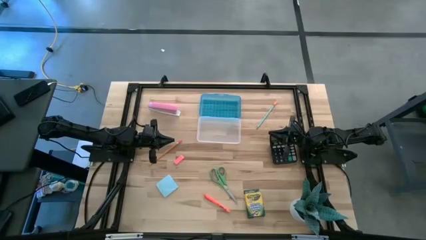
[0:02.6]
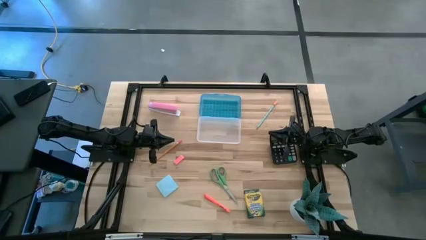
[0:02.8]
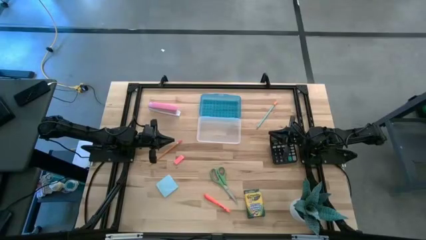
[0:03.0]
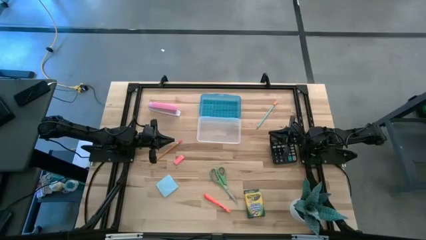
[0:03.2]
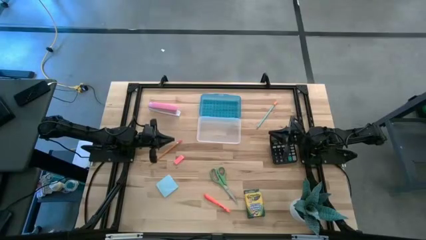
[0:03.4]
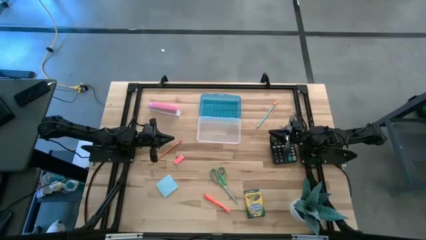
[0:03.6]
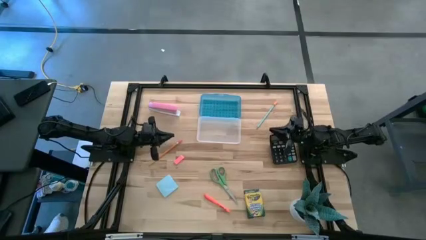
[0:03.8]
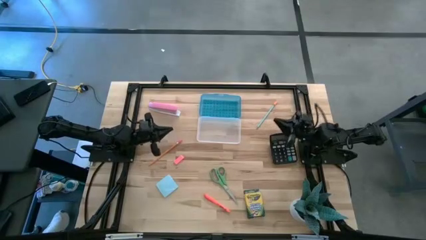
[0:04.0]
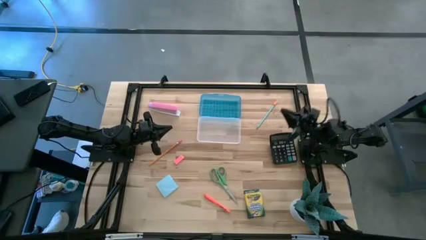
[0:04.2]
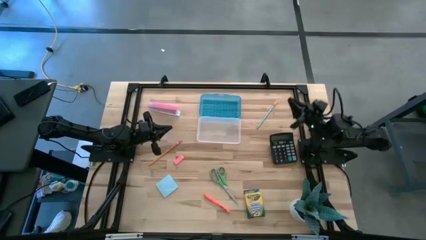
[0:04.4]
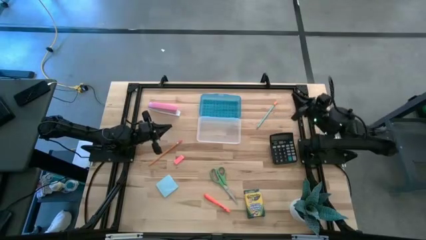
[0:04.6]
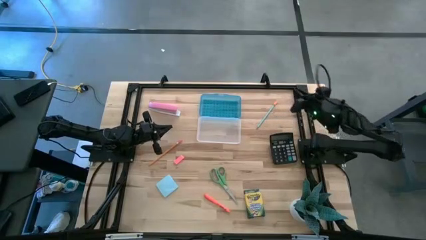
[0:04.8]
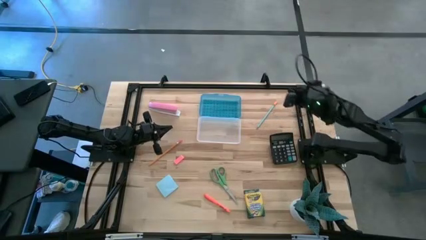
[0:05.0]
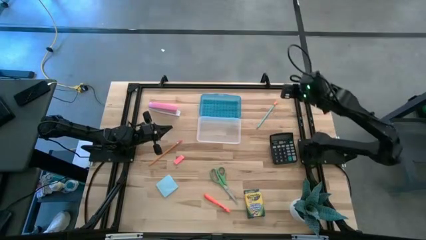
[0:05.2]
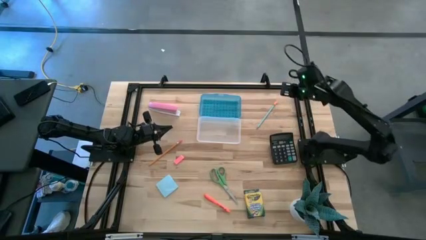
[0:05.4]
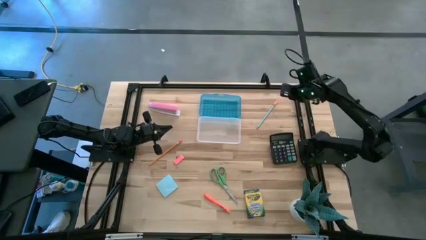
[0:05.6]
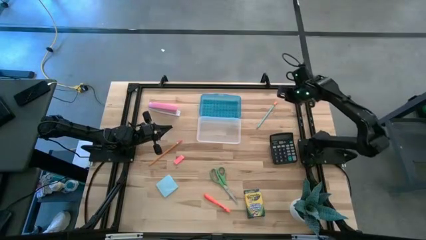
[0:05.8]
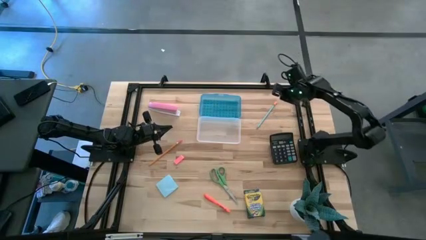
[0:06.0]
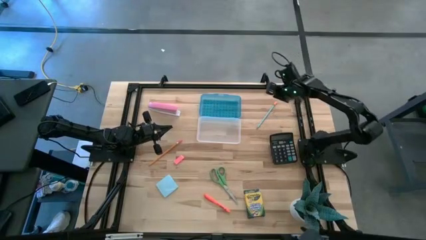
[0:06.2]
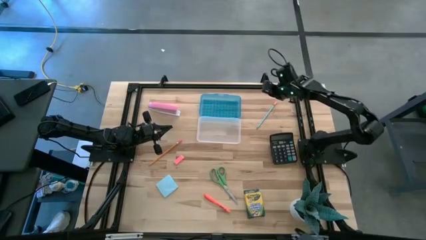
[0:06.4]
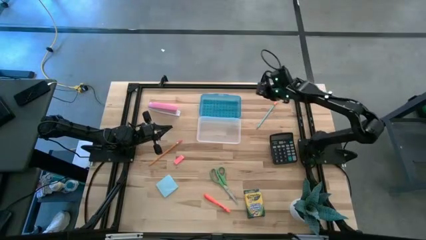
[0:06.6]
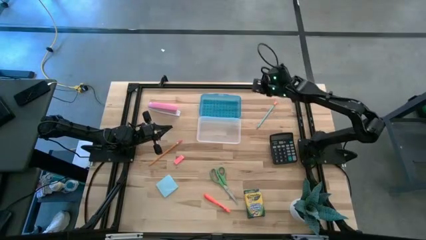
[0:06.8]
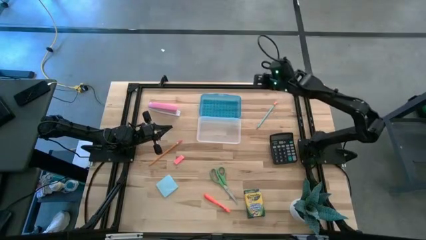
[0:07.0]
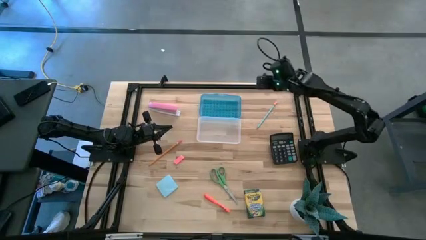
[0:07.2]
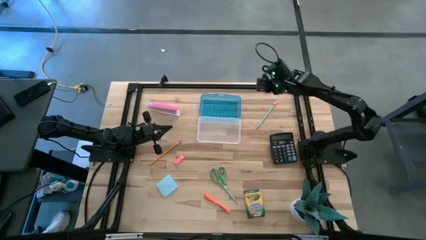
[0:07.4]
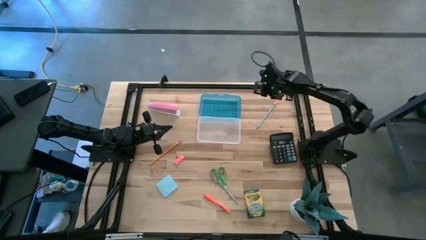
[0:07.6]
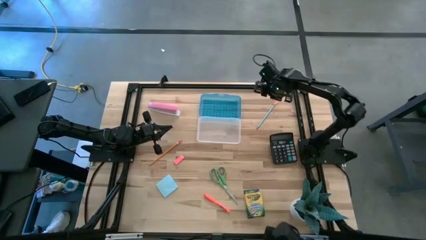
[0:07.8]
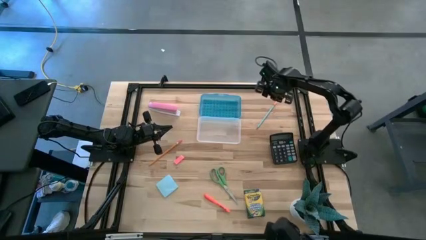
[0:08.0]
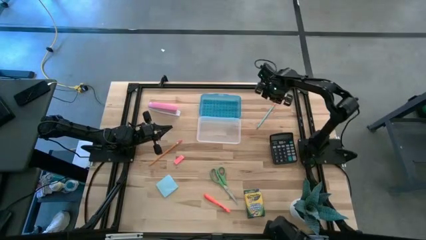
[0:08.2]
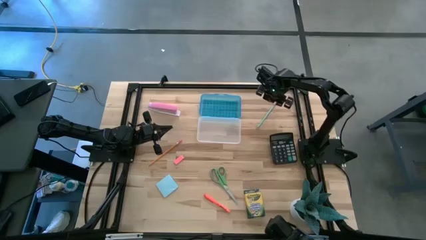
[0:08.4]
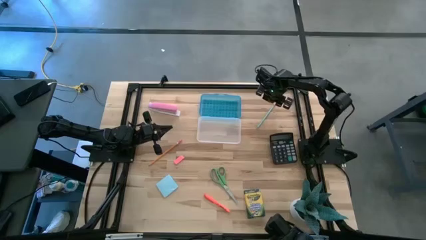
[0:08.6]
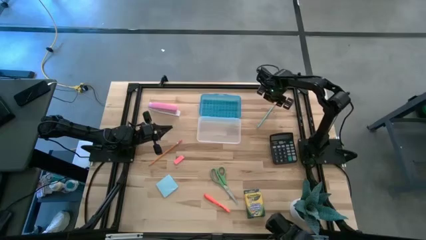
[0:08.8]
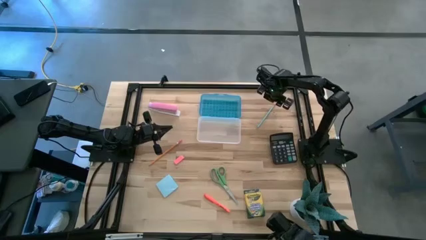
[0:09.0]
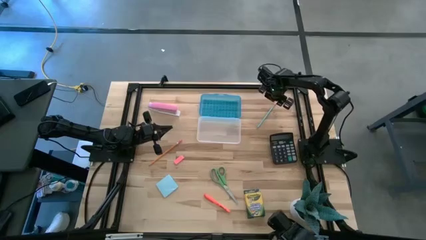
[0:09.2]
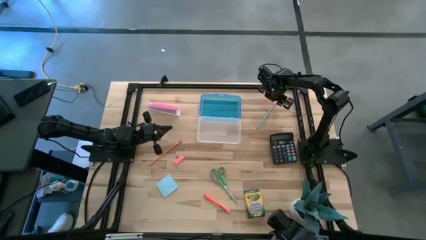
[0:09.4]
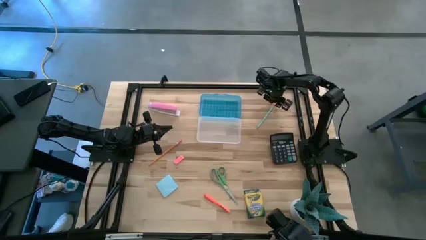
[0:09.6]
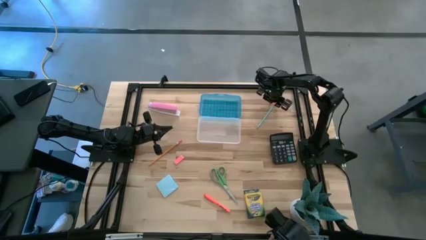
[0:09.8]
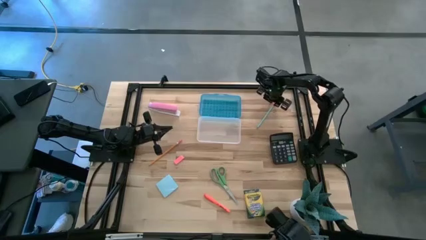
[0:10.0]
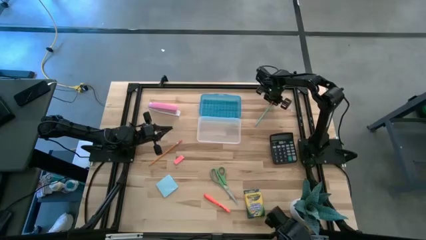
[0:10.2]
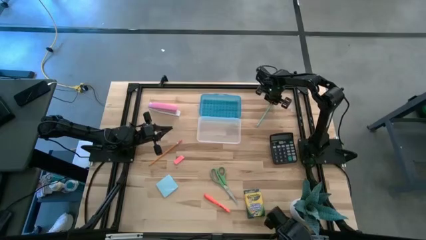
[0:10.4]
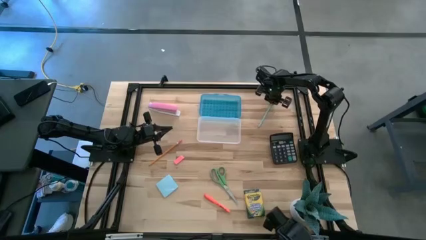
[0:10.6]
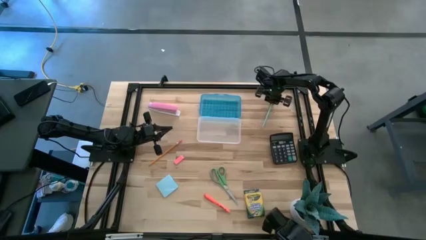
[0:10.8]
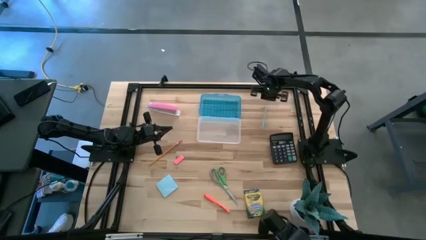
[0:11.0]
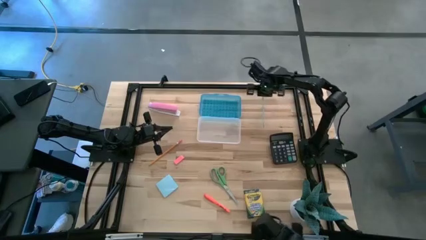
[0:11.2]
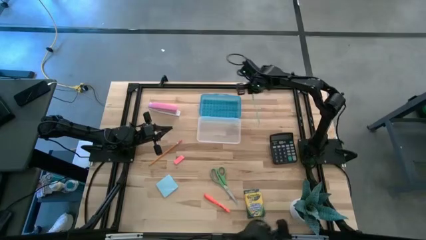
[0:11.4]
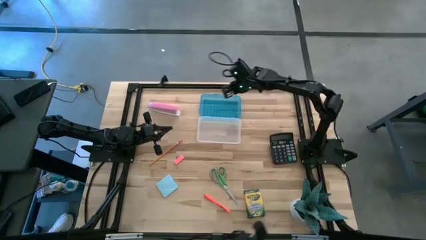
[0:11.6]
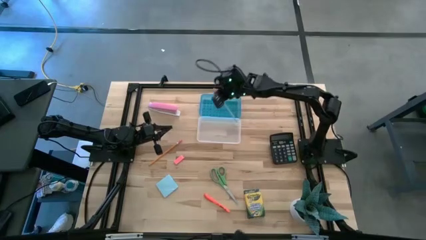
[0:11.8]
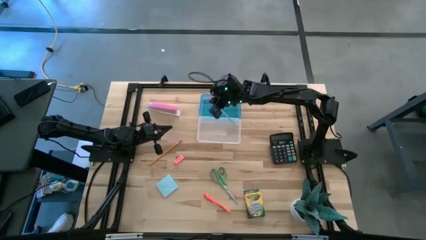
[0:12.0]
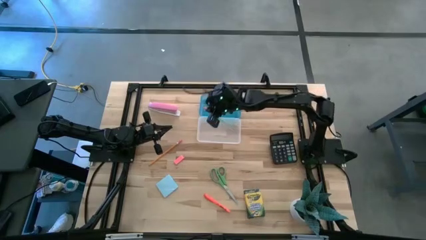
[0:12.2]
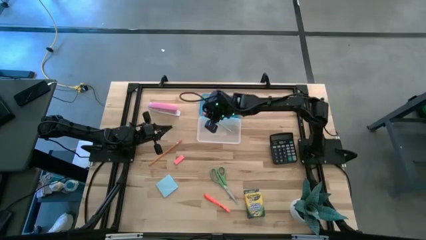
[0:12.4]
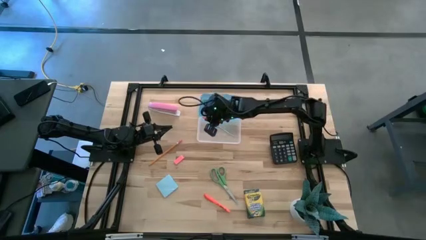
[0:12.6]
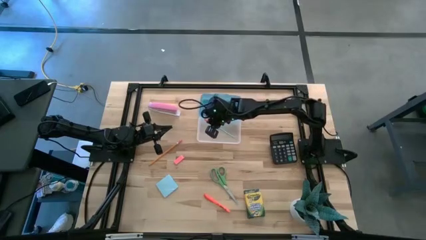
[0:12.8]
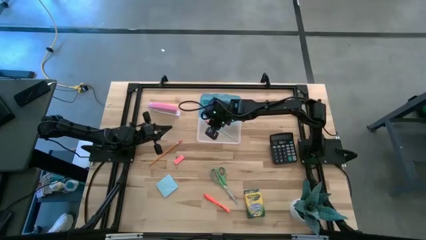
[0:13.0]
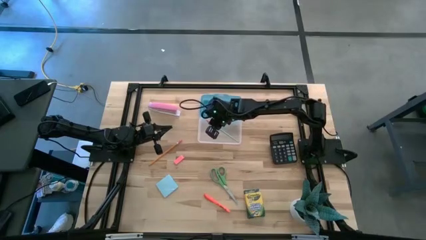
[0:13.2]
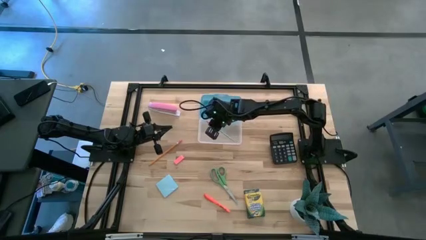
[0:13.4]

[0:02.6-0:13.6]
Task: Pack school essentials
Put the blue pencil into the blue supply box

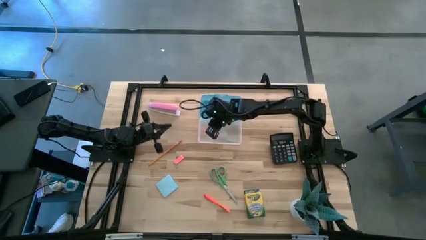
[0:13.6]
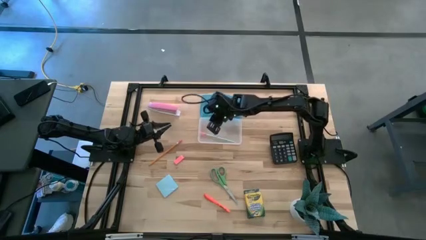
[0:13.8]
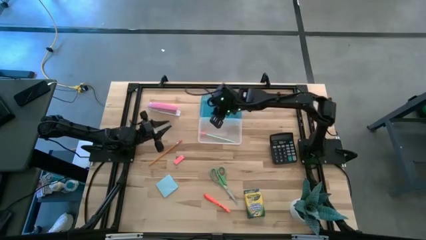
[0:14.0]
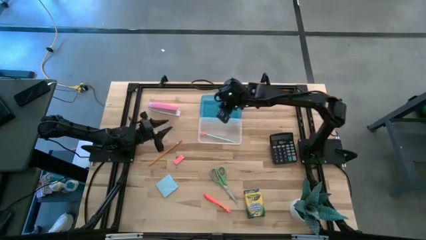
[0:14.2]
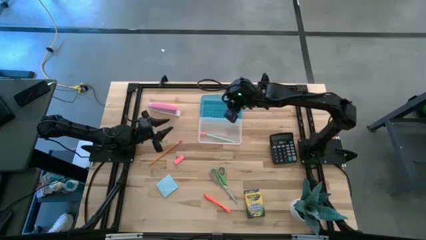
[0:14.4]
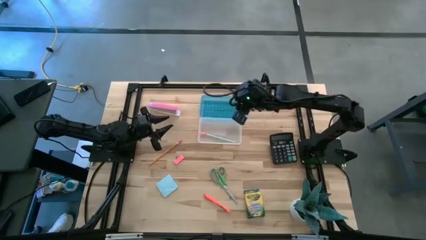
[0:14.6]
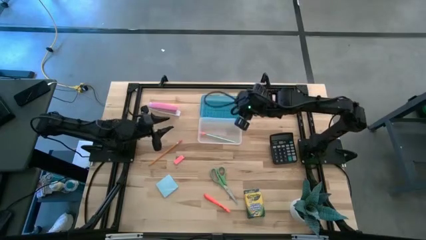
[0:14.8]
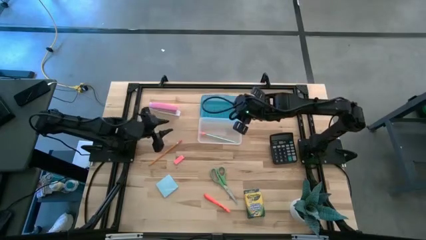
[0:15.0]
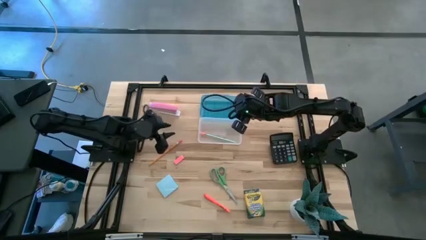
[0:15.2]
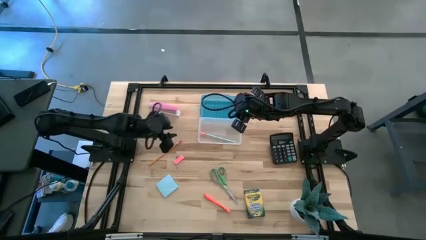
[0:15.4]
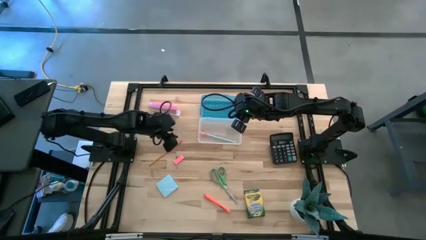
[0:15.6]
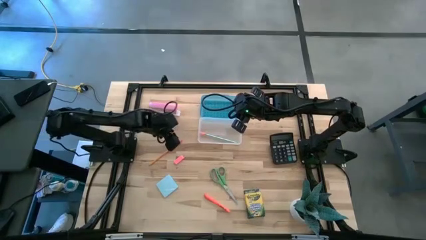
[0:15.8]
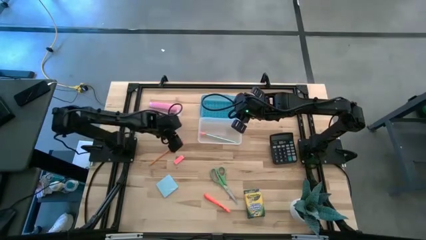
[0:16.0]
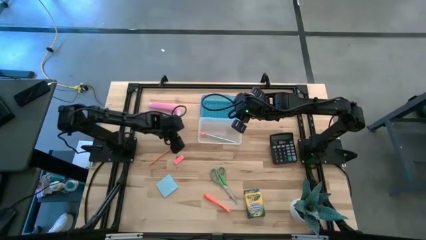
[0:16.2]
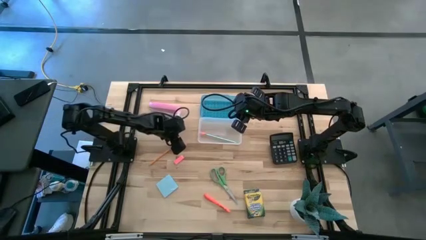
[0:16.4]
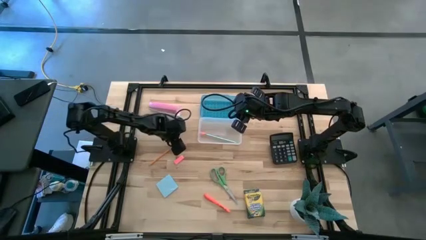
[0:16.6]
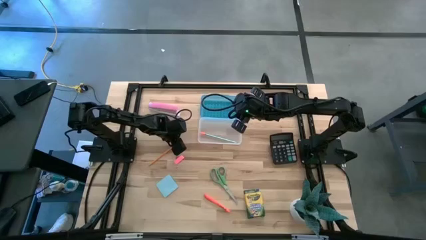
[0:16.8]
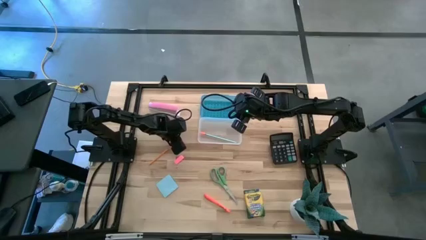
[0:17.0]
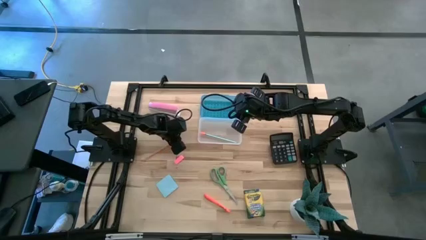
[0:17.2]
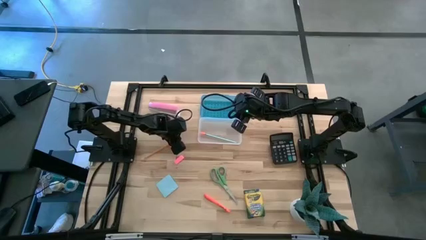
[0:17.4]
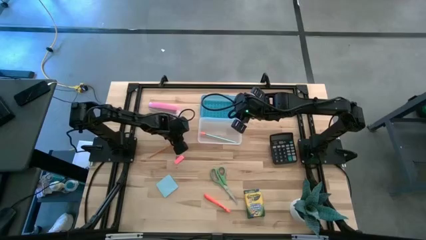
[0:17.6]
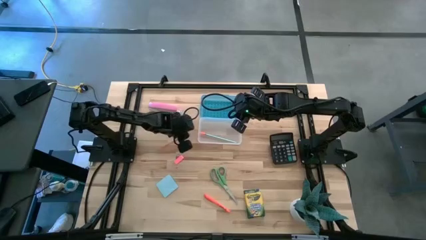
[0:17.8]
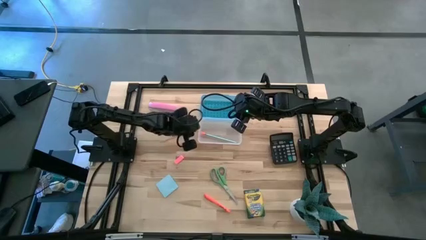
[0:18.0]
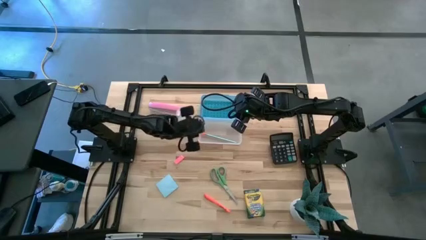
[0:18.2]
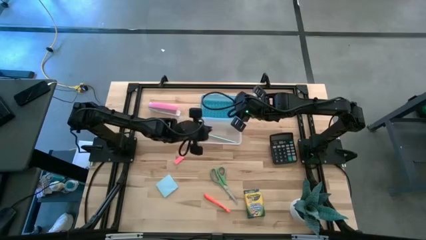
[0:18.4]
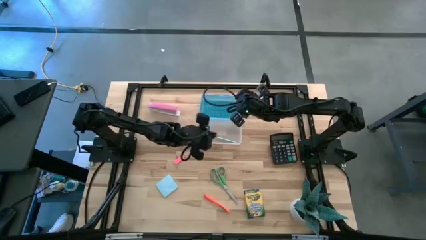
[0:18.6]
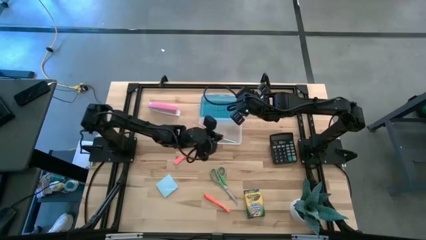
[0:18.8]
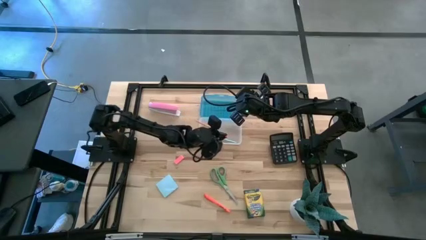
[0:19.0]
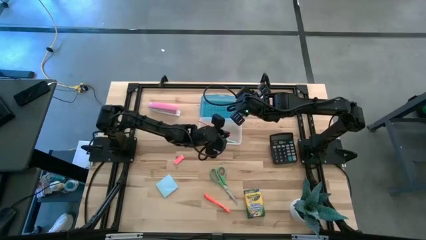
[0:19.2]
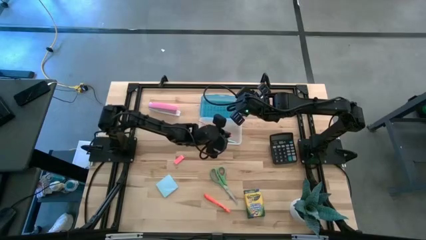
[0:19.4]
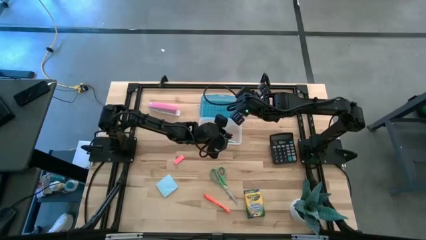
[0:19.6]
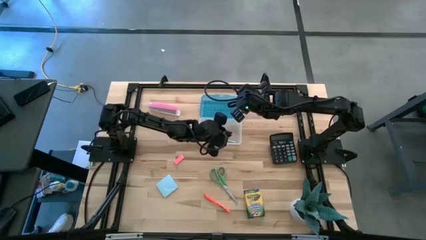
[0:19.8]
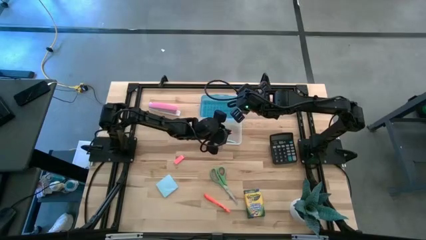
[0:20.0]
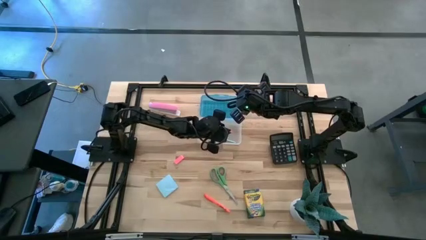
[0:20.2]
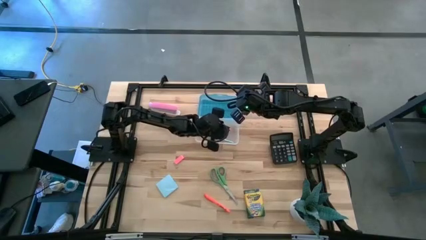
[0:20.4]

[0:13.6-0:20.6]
Put the yellow pencil into the blue supply box
